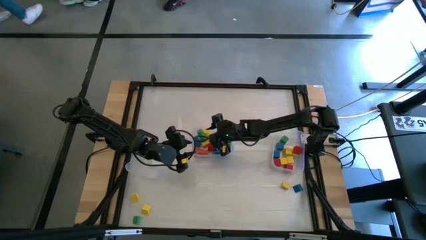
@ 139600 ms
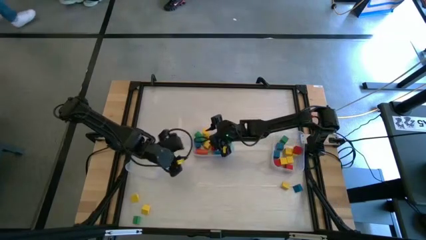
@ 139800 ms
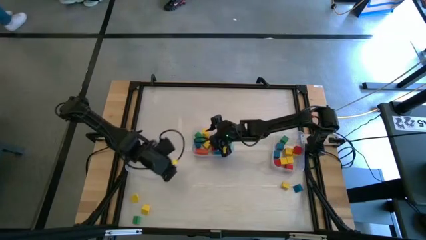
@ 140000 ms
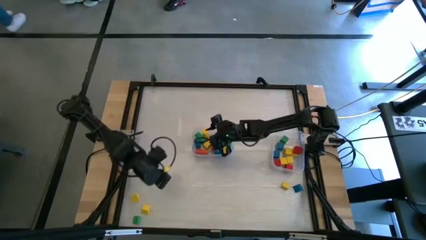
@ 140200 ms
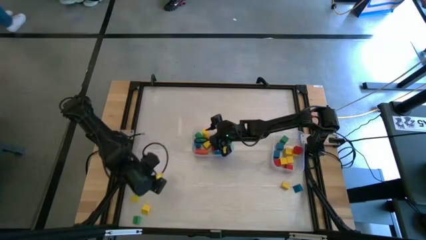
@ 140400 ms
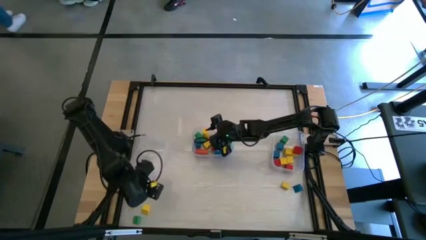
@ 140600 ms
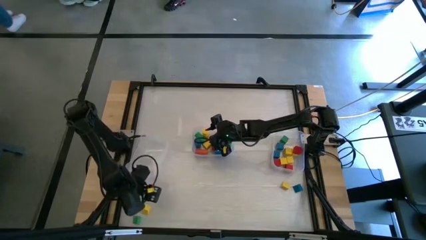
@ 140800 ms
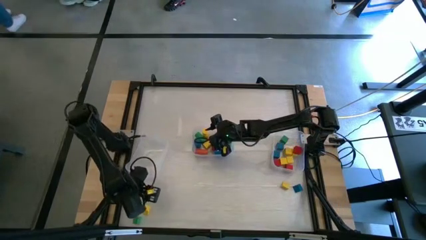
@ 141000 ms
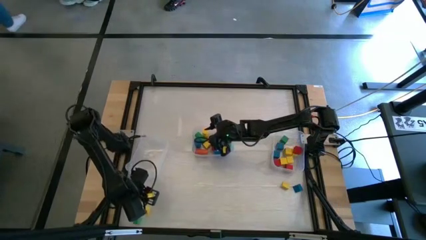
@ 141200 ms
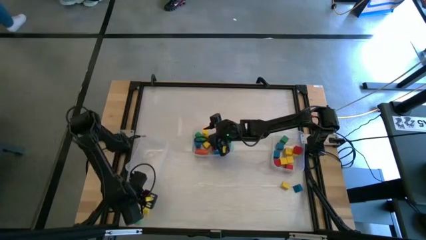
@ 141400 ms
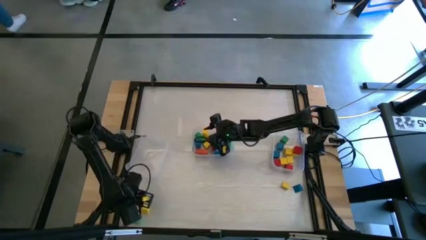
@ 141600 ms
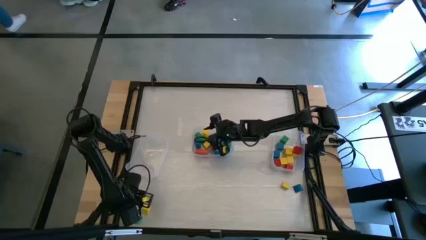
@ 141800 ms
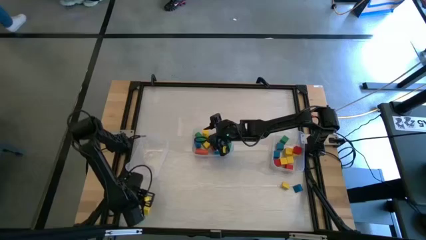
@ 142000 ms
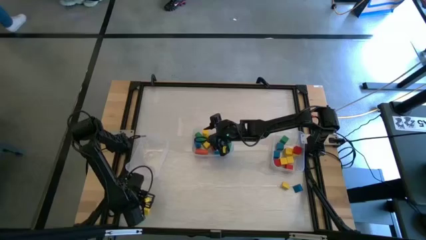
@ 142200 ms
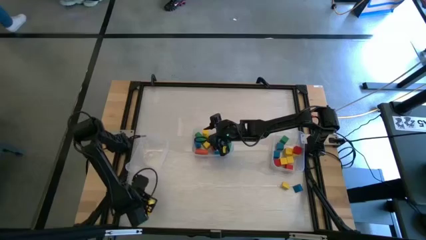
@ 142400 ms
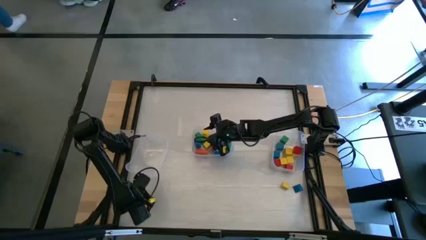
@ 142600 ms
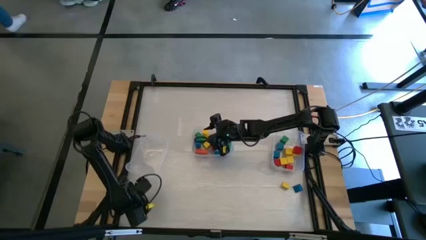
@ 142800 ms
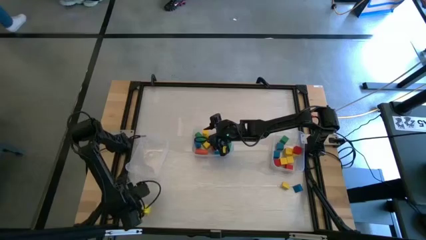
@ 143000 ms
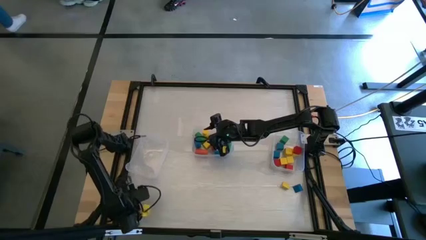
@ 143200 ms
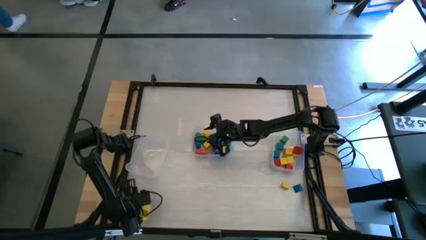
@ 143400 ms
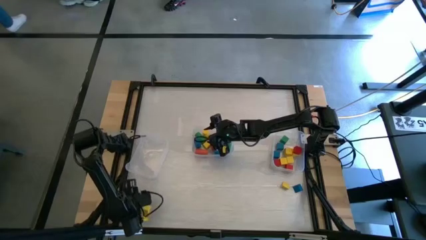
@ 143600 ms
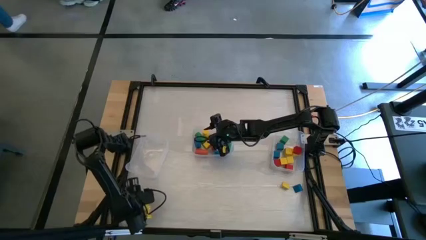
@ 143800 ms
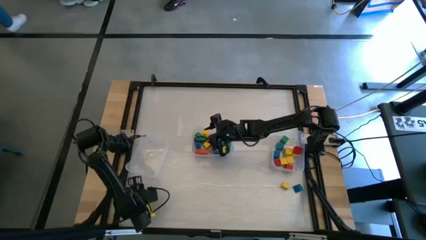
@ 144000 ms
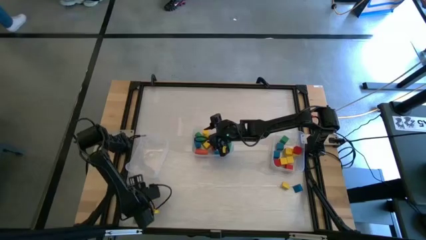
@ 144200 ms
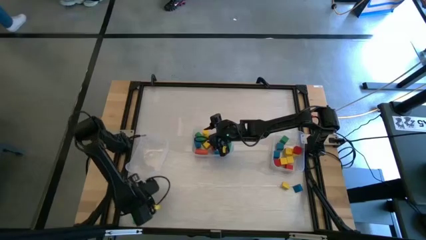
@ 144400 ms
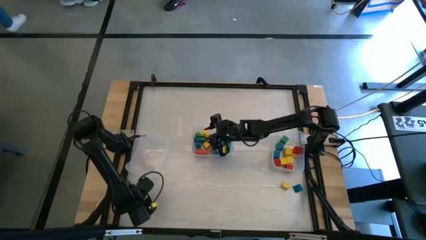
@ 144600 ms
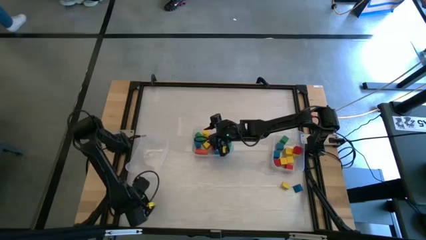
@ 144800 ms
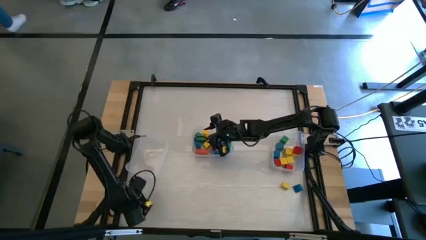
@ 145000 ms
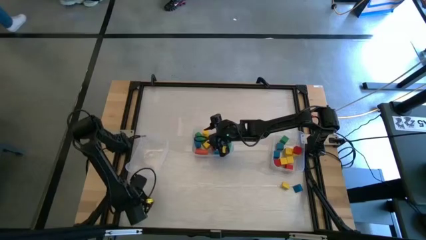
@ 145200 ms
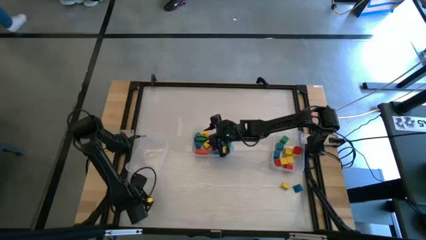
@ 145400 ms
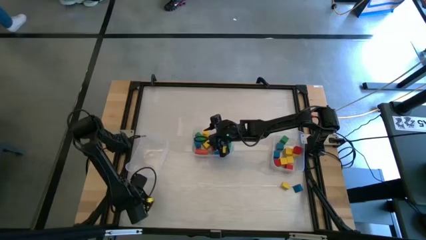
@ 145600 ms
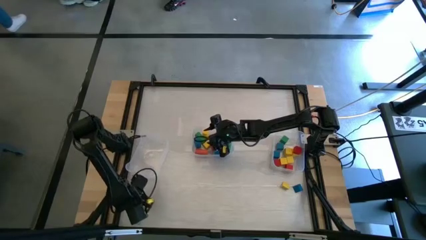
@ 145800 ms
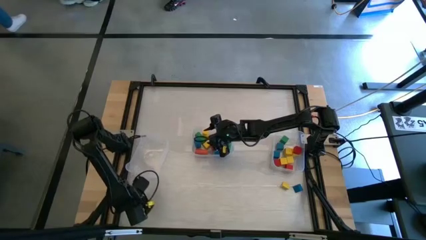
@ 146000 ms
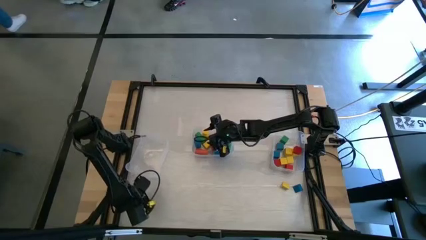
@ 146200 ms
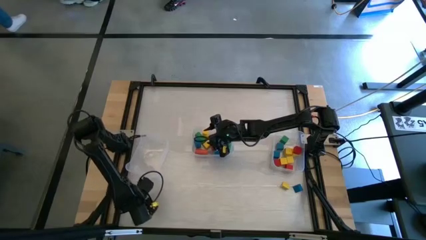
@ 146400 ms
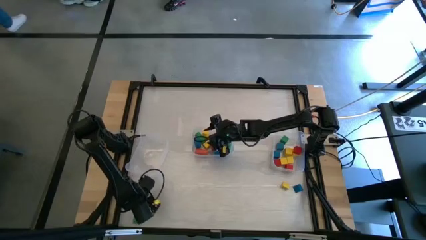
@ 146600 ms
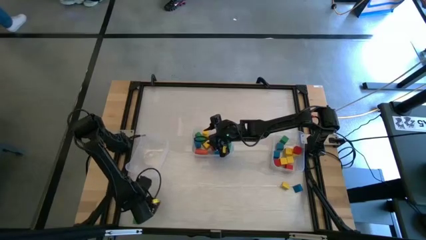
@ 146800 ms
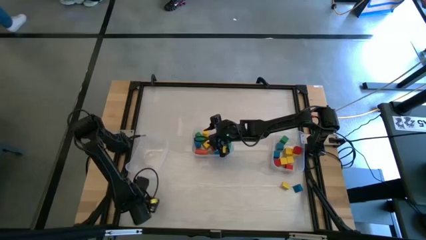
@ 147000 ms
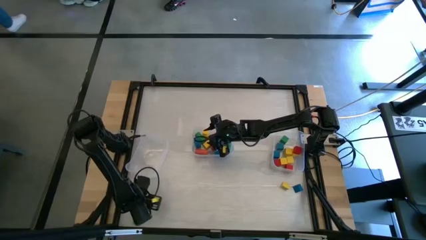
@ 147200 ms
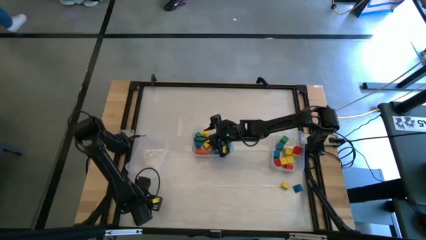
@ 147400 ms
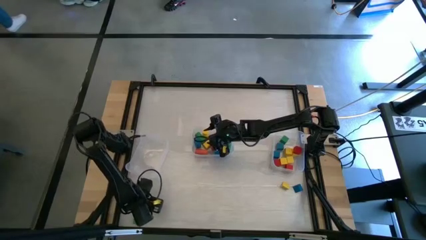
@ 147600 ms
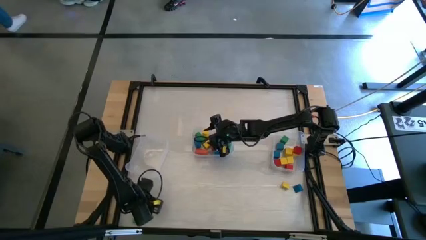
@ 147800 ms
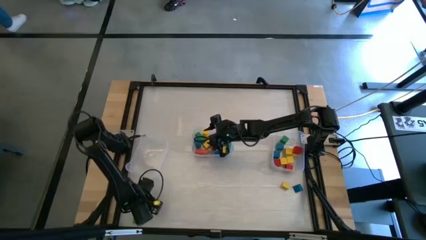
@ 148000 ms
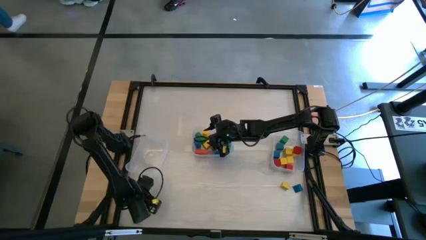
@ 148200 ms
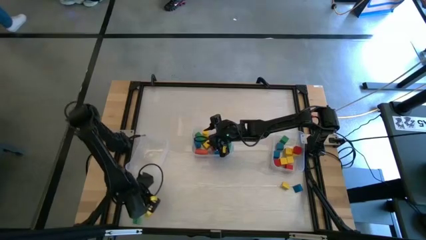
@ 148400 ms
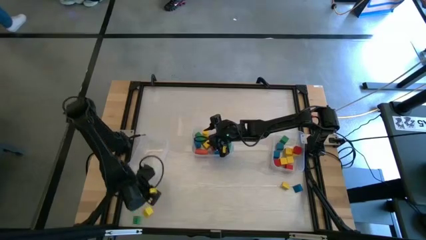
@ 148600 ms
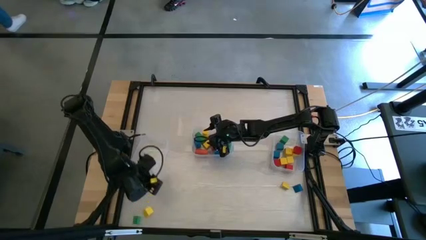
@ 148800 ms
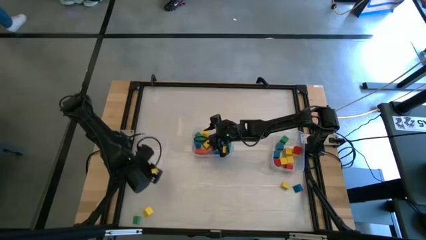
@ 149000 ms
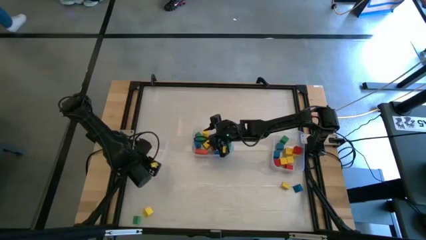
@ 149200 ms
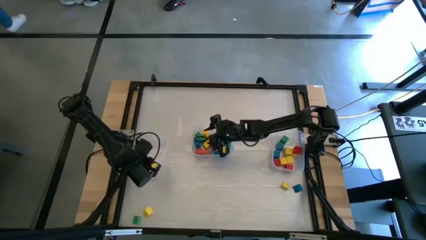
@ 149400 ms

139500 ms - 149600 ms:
Task: Sort blocks by size
Put the yellow triangular block into the left transparent bin

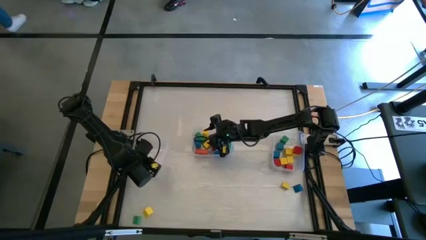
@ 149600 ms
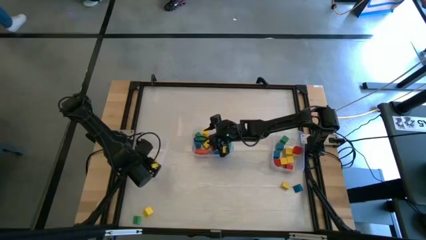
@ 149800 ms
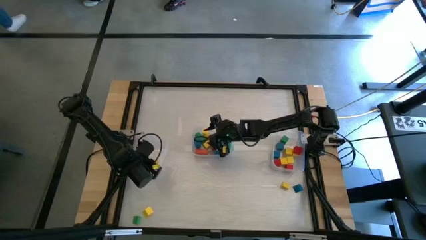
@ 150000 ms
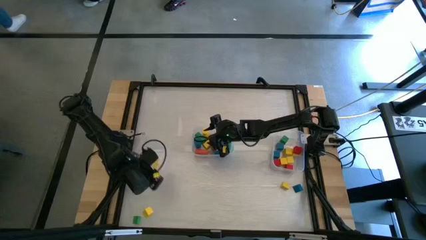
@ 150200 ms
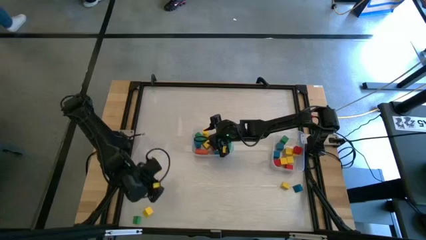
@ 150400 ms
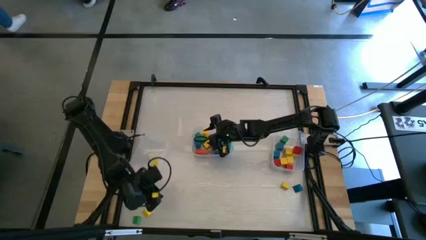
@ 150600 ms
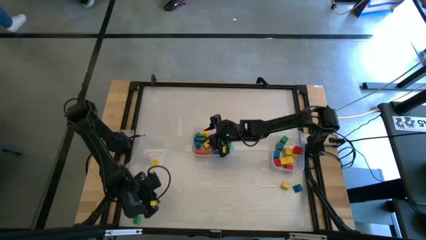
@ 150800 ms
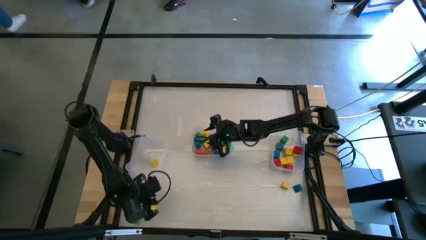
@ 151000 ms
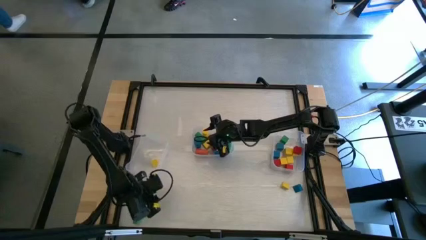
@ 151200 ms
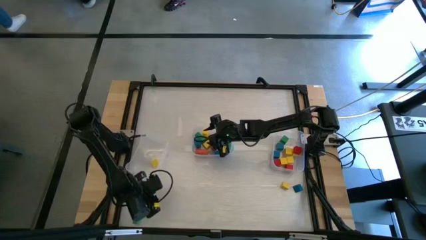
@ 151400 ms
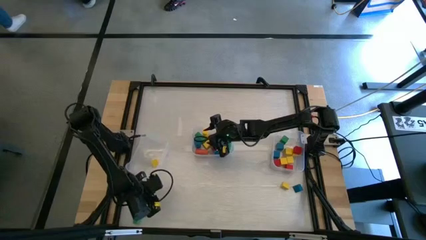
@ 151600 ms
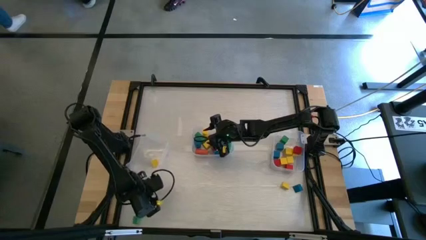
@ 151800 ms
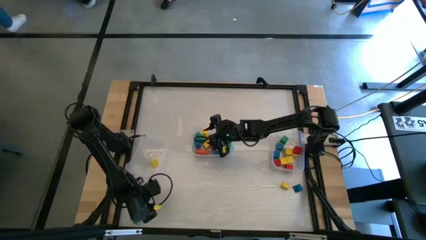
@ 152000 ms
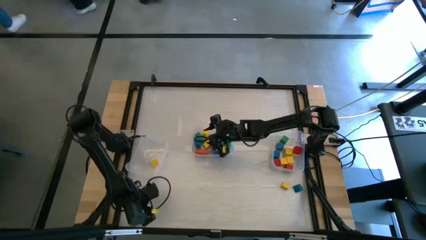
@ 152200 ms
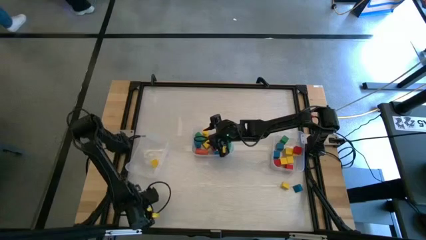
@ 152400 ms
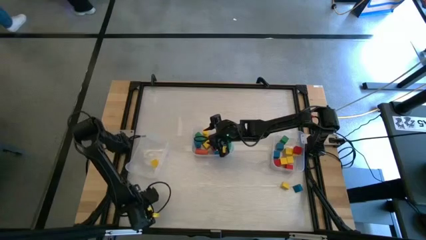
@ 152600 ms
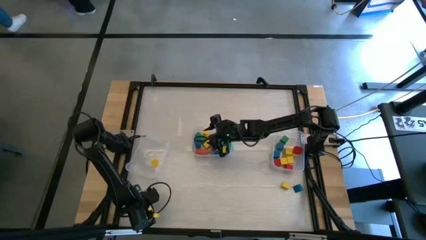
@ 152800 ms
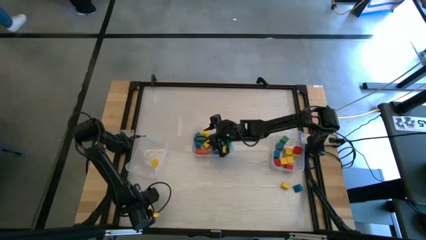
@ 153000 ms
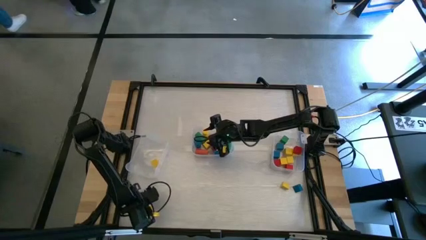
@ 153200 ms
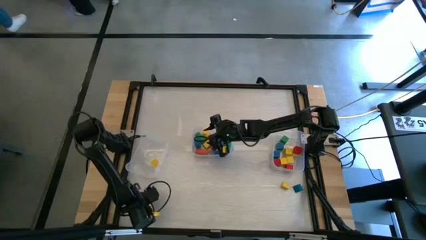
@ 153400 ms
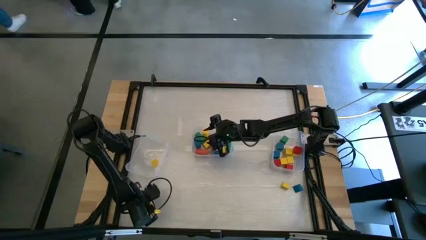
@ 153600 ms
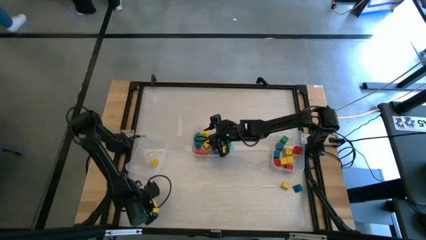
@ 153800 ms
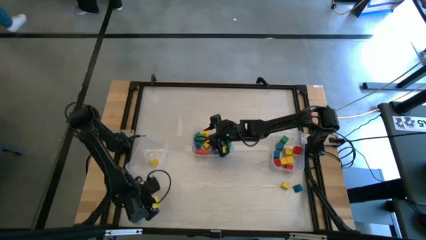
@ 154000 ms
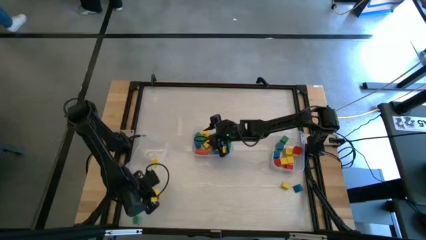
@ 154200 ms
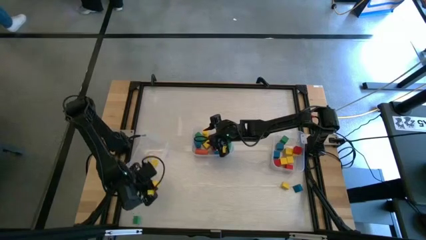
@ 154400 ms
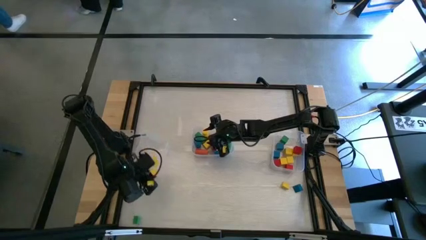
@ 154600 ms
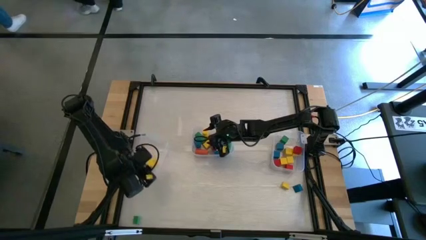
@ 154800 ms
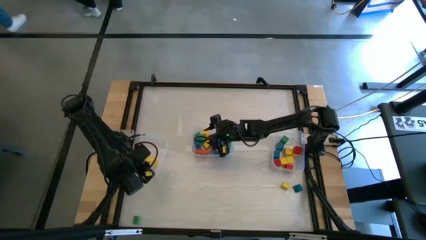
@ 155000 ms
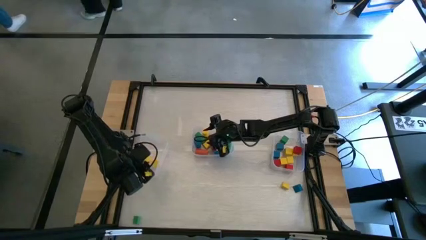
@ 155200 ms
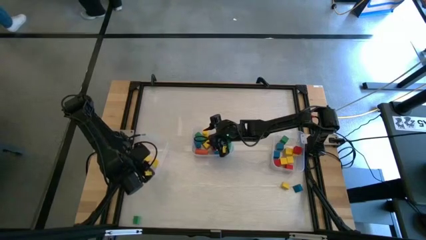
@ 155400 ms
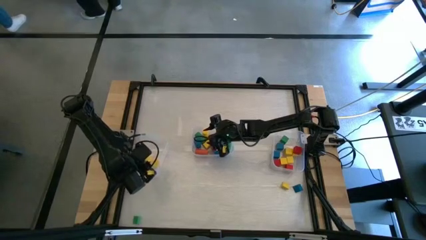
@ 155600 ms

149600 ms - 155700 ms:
Put the yellow triangular block into the left transparent bin

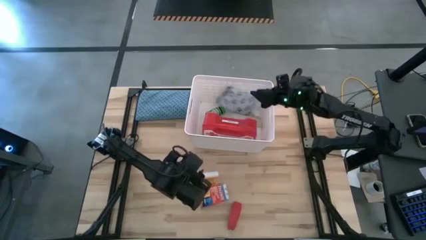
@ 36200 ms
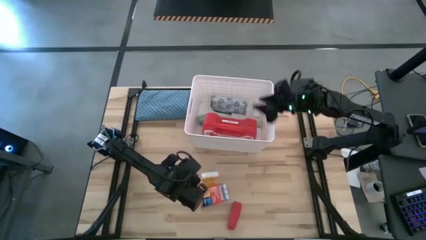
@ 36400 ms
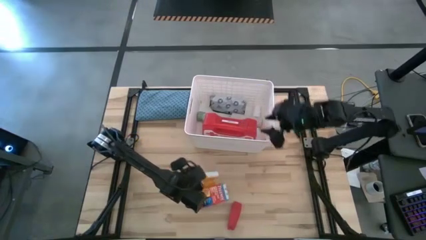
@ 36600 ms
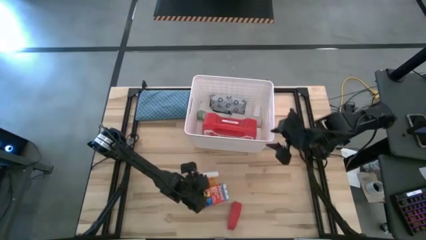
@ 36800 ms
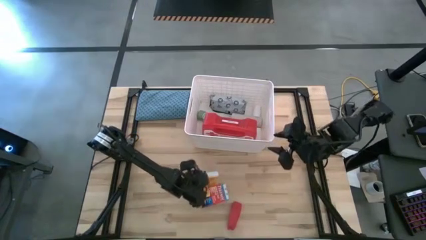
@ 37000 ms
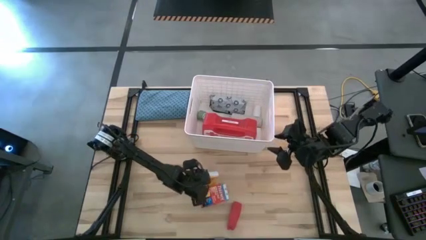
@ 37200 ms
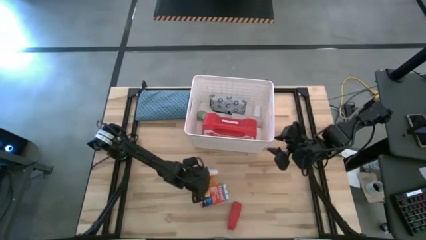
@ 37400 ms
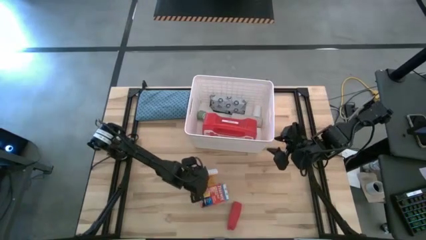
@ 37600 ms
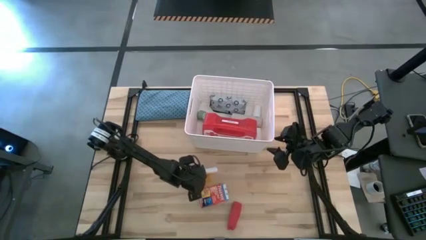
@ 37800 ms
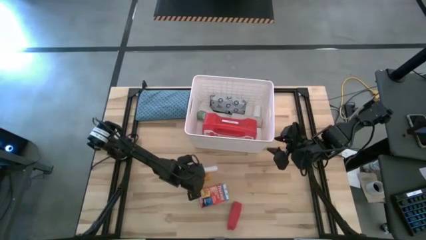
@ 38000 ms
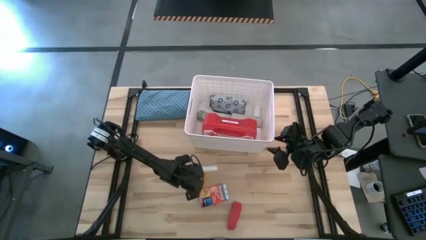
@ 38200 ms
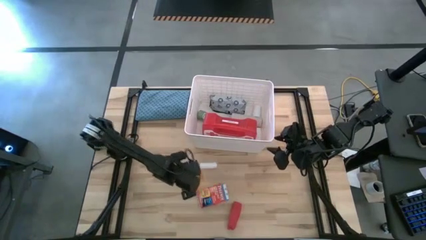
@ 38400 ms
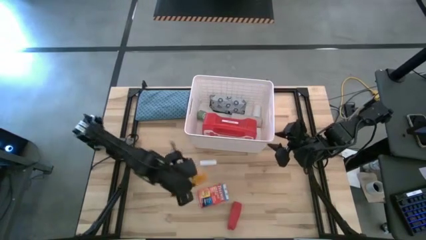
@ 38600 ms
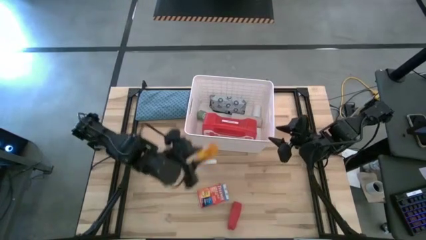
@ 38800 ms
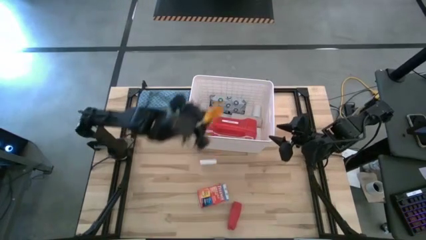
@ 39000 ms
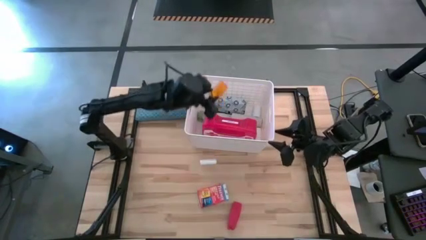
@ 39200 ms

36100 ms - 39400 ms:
Task: Pick & place medical supplies in basket/bin
Put the orange medicine bottle into the white bin
